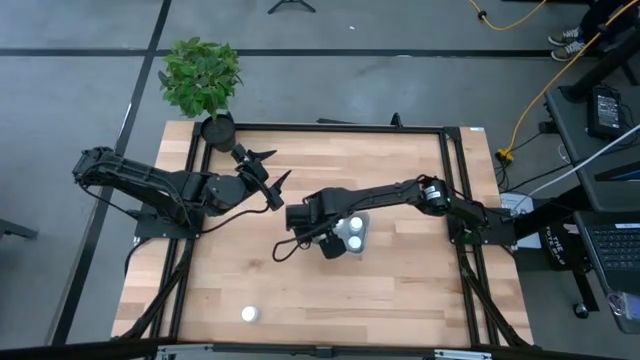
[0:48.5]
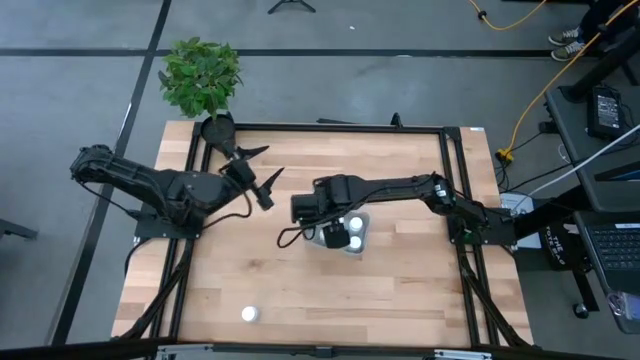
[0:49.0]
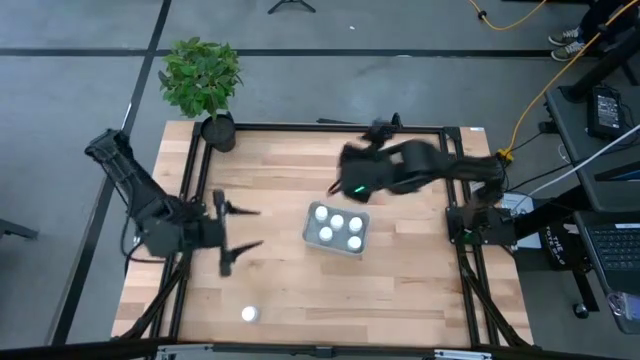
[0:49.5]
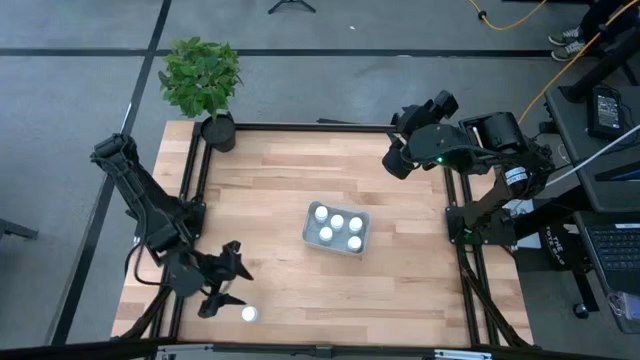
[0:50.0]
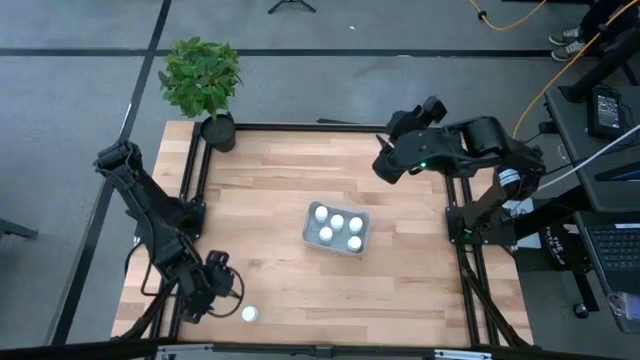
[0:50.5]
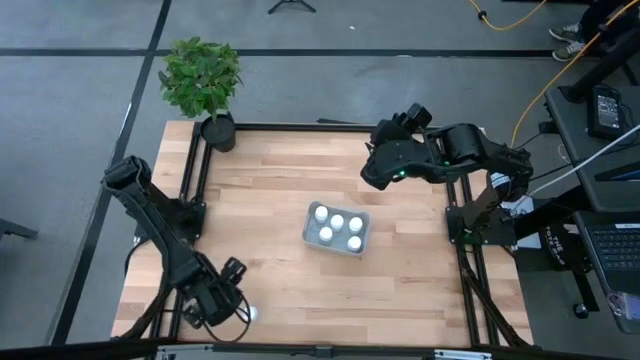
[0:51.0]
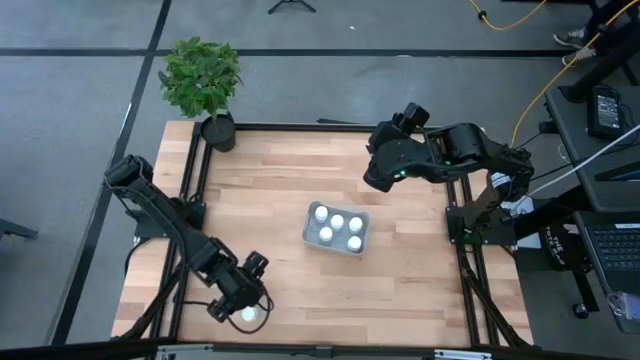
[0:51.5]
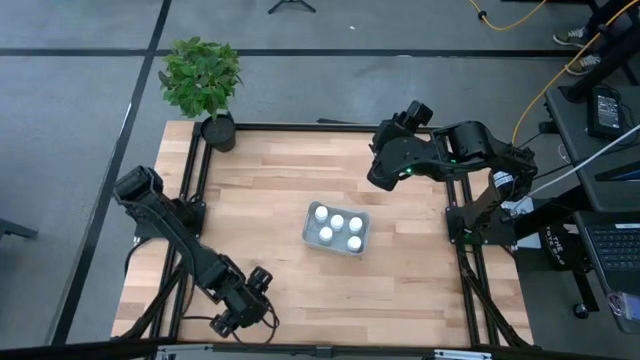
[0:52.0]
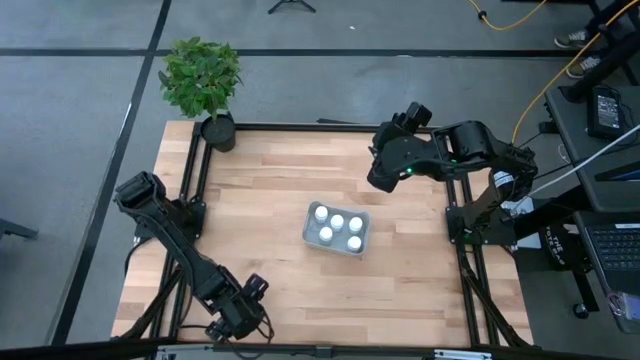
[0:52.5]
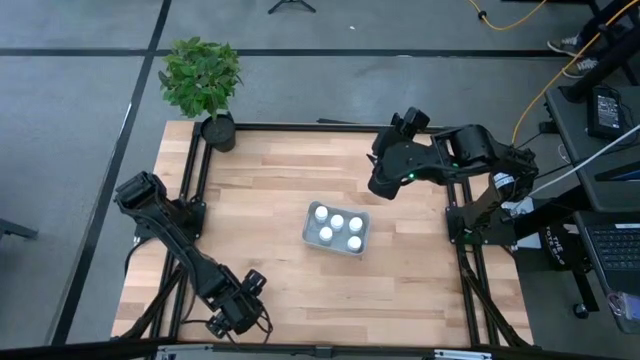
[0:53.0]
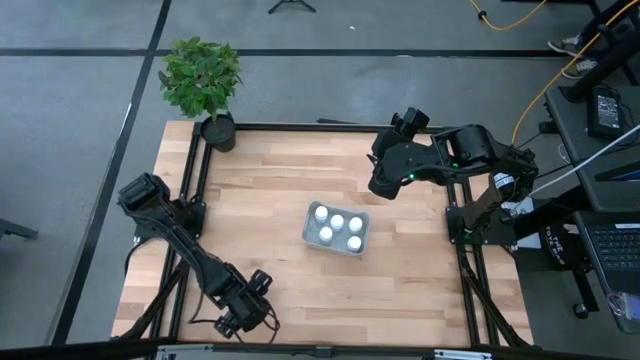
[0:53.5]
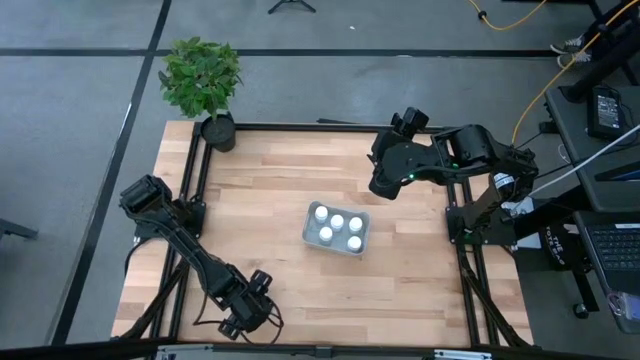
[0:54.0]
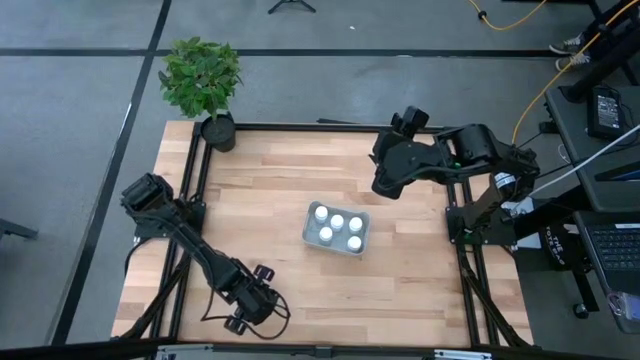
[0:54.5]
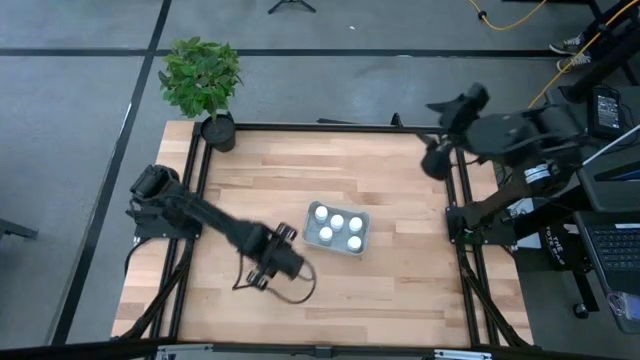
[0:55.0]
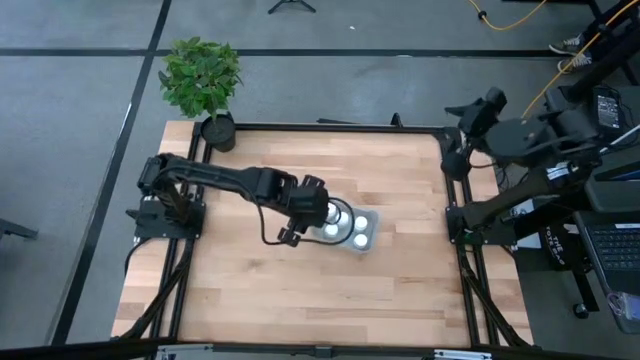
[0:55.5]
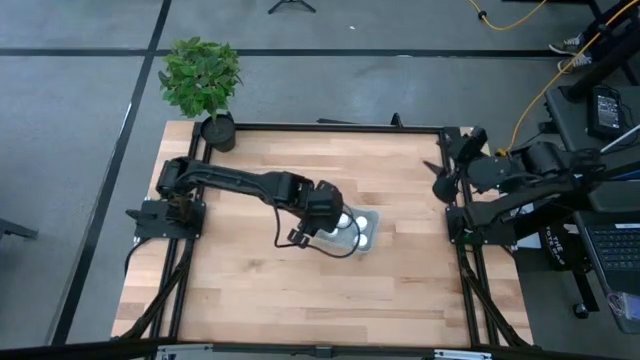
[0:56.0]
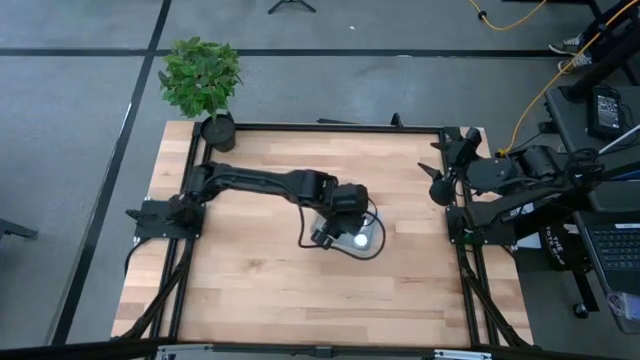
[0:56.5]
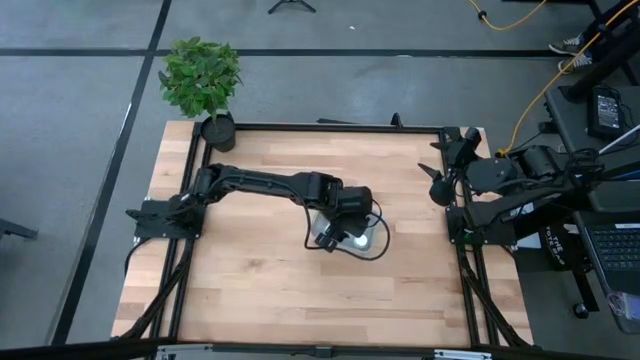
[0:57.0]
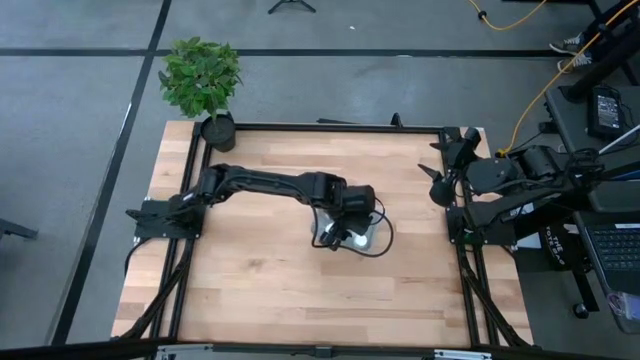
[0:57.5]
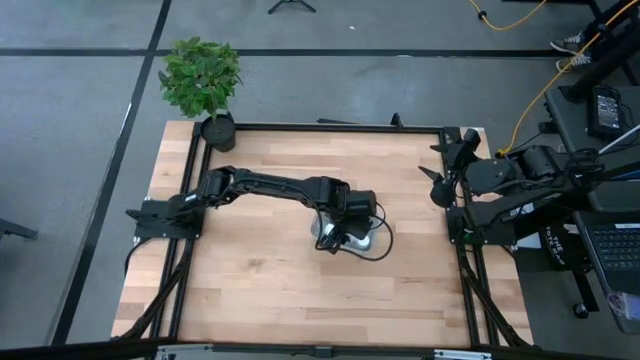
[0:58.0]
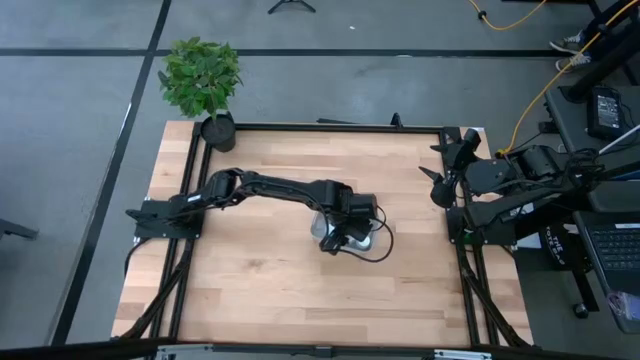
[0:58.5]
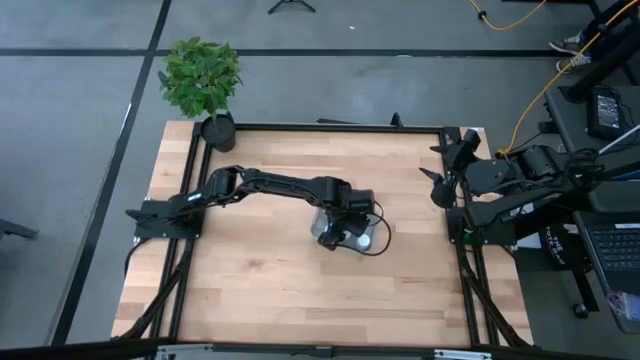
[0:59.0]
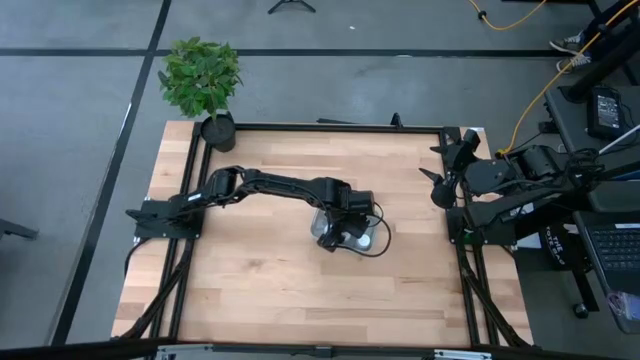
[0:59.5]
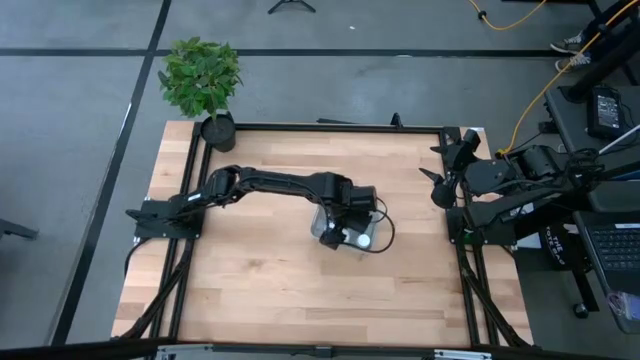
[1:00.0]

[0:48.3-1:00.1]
Task: Pick and place pill bottles into a basket
Put the white pill bottle into the gray bin

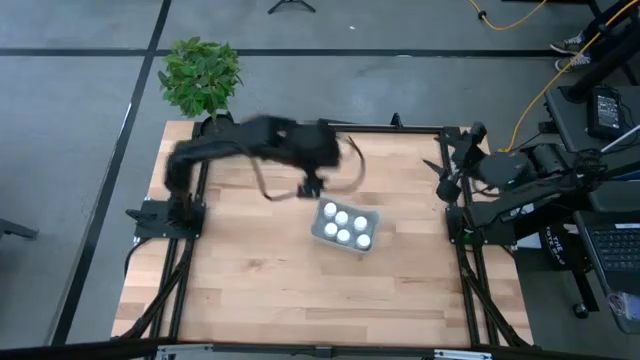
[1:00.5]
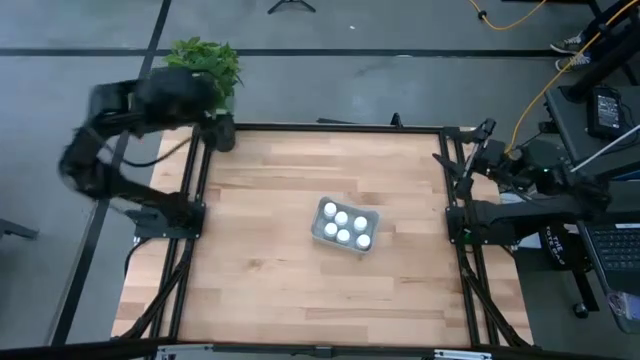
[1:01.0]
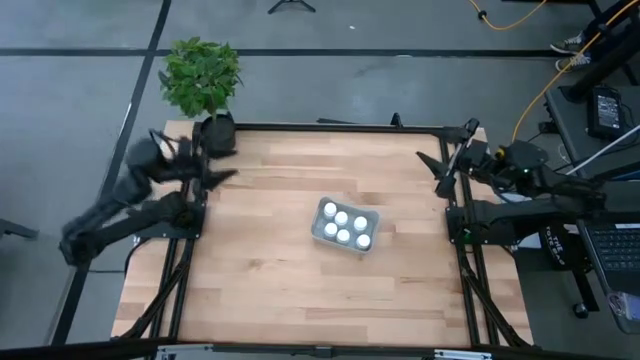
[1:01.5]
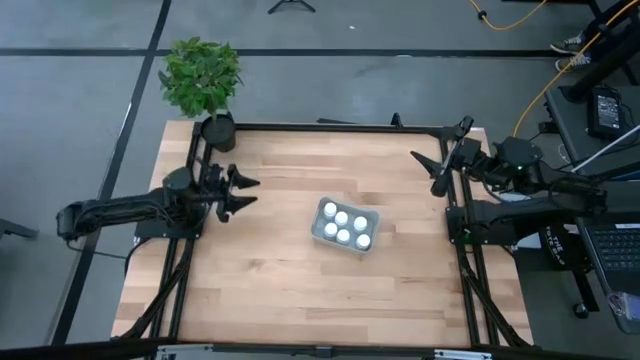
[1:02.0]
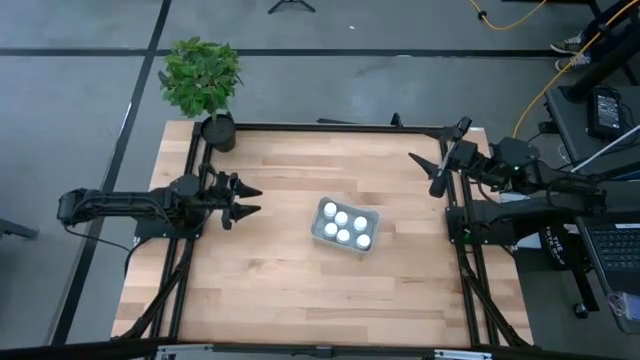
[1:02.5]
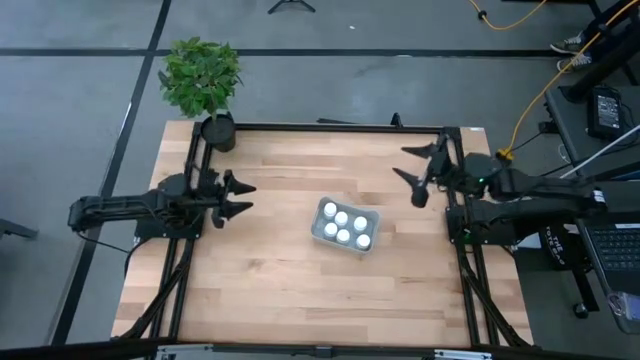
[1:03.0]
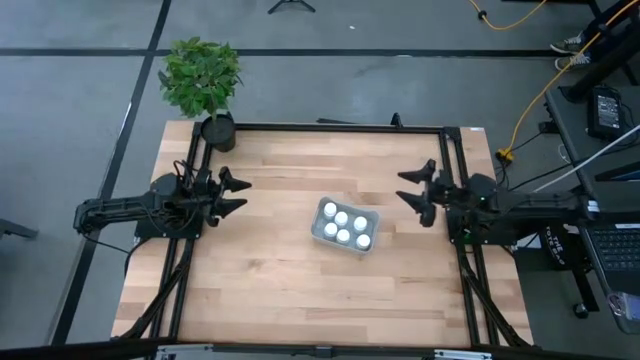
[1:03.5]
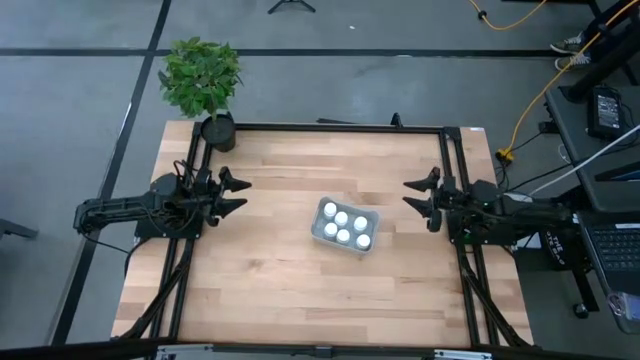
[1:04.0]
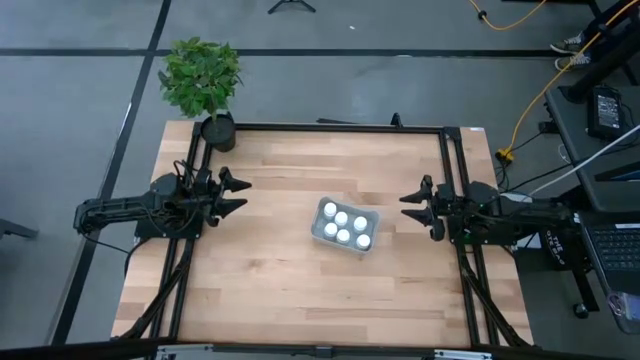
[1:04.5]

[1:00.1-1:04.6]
Return to Home Position

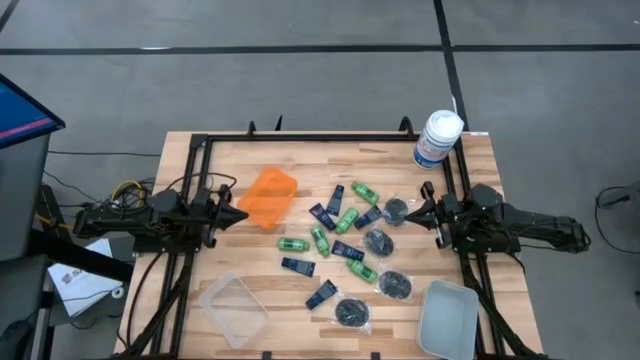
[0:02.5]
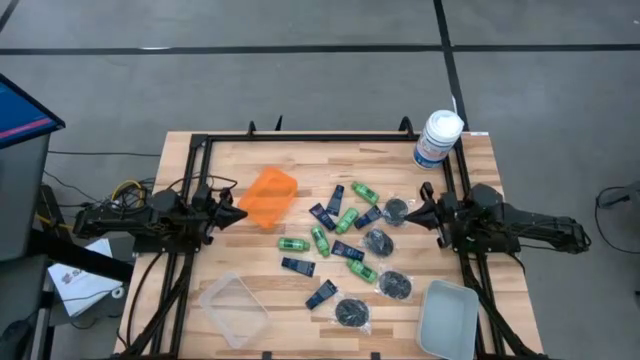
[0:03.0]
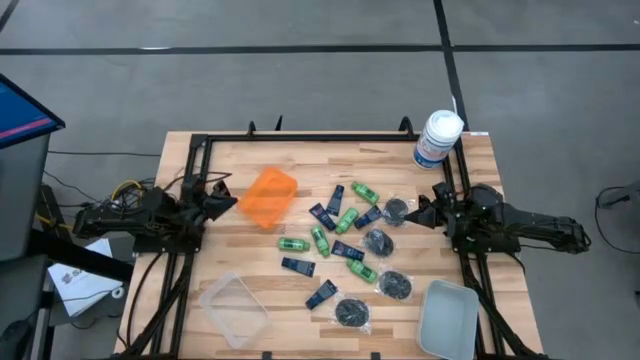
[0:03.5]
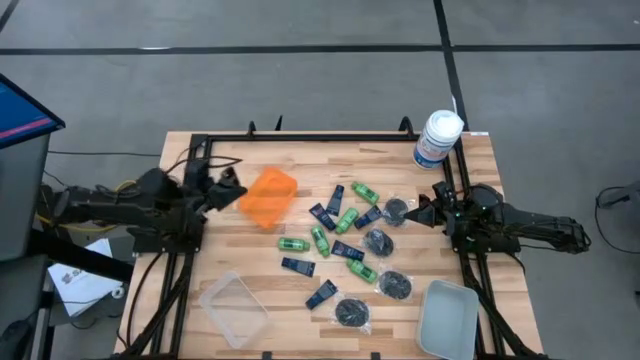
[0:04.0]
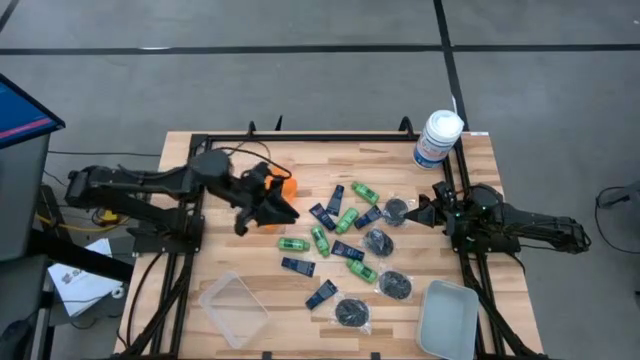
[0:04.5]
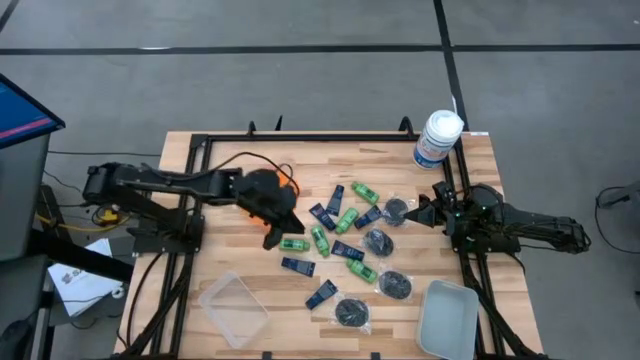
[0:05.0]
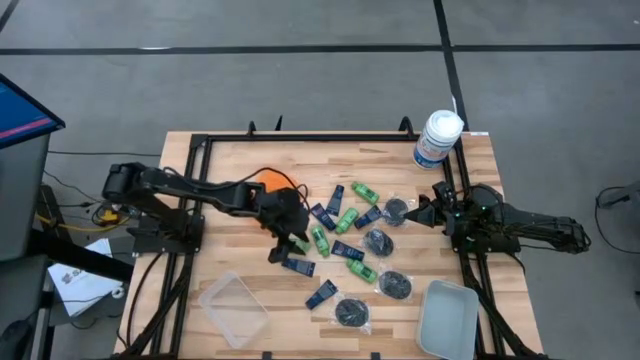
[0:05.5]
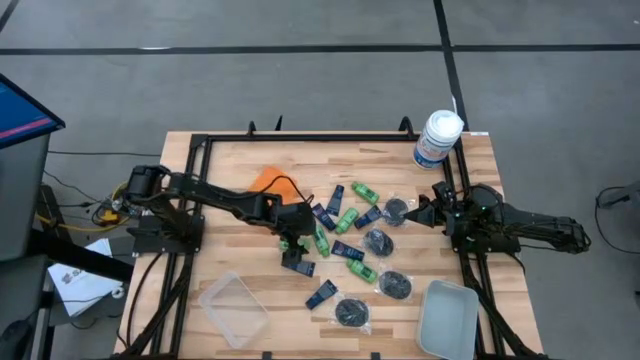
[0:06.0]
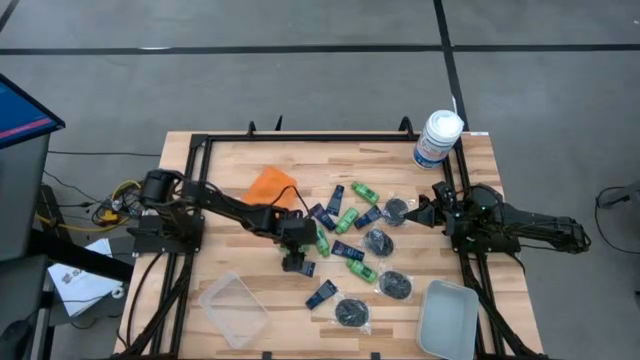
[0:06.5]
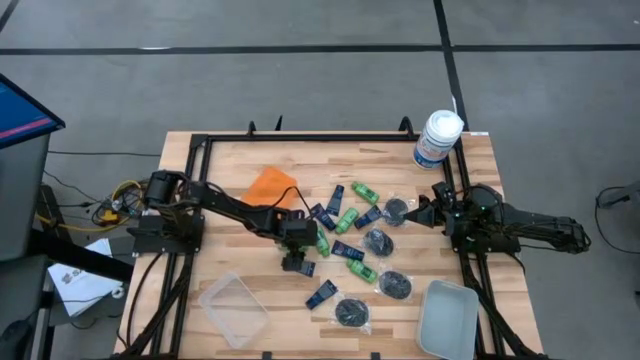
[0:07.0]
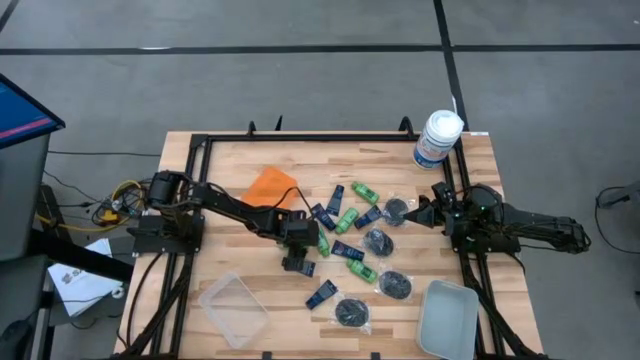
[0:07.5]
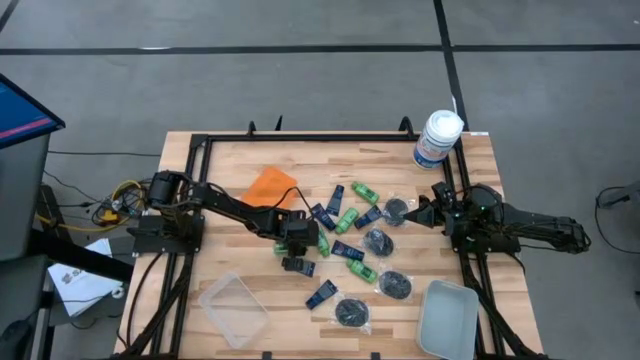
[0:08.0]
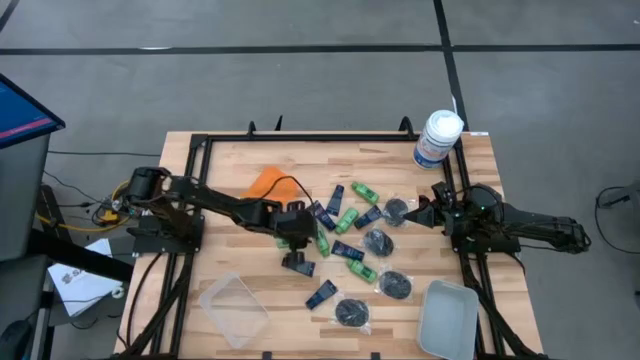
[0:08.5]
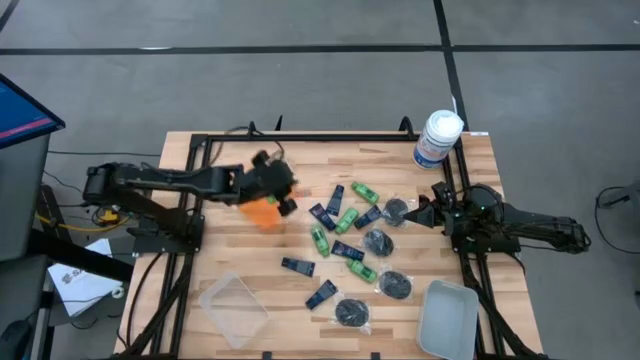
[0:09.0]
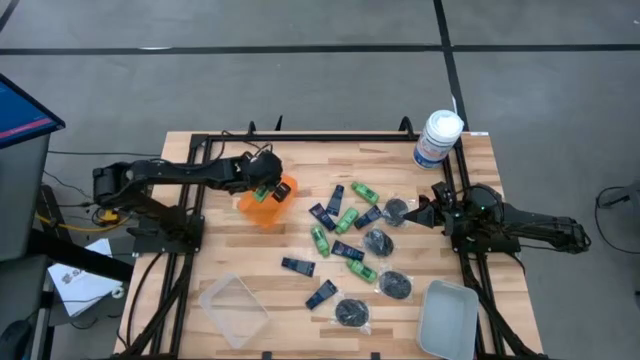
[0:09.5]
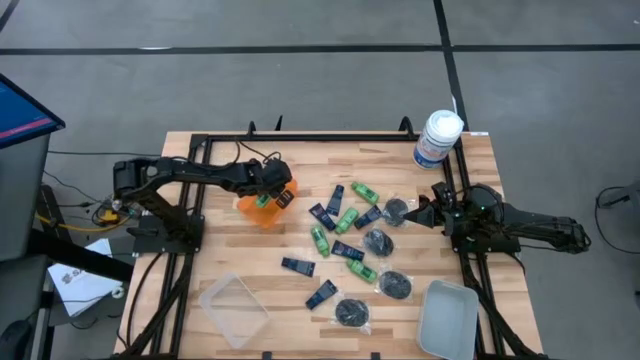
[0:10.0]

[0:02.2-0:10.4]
Task: Pick & Place Travel size toiletries
Put the green shampoo bottle into the top orange bin
